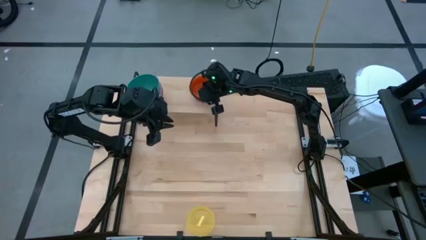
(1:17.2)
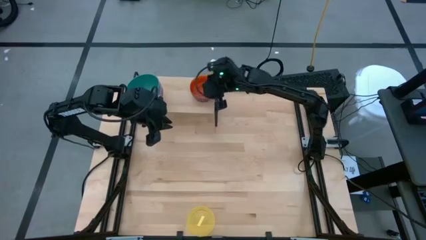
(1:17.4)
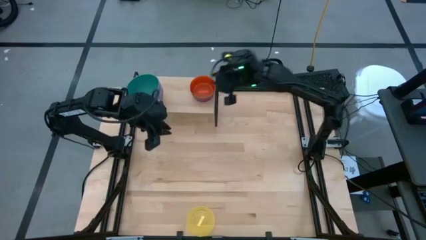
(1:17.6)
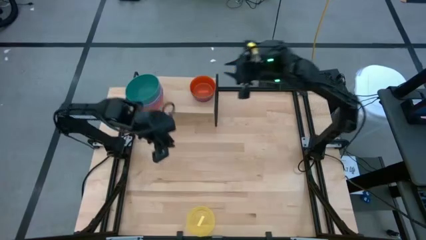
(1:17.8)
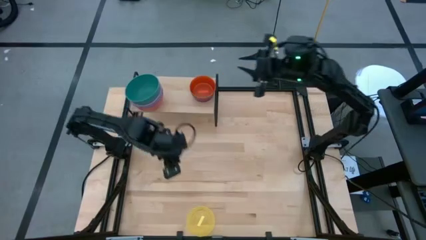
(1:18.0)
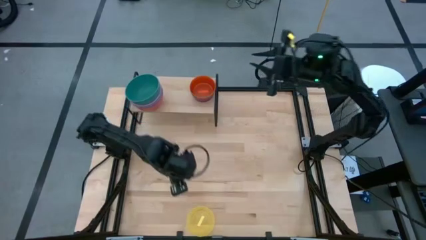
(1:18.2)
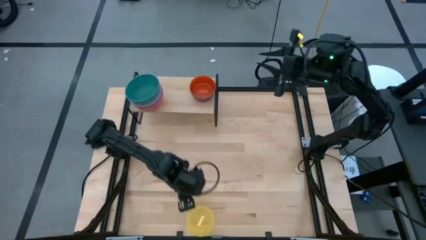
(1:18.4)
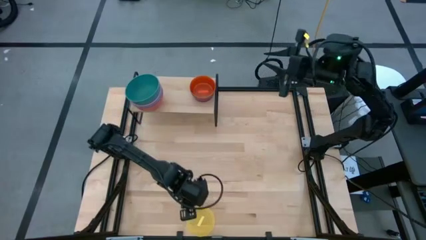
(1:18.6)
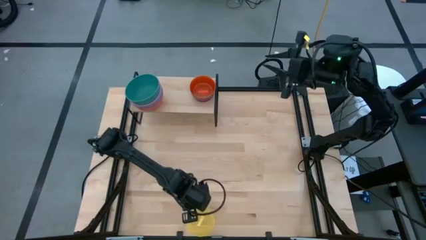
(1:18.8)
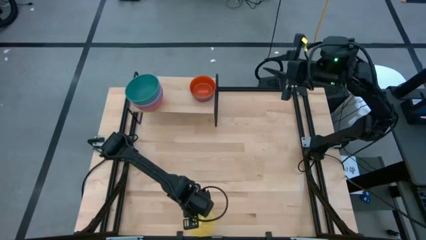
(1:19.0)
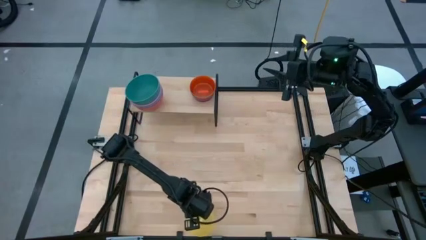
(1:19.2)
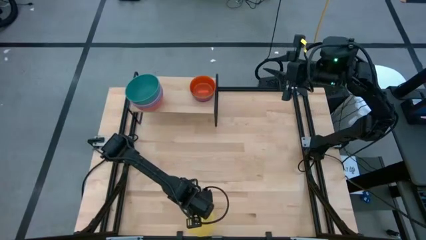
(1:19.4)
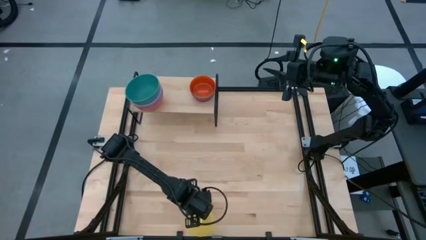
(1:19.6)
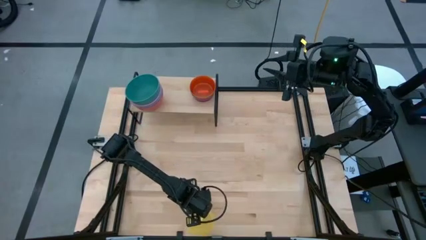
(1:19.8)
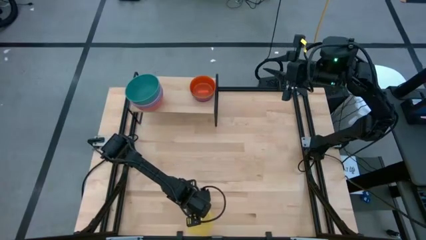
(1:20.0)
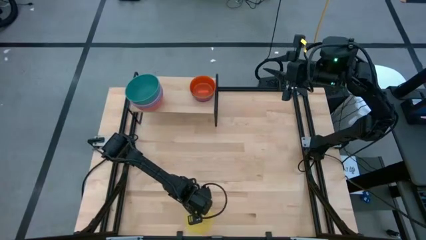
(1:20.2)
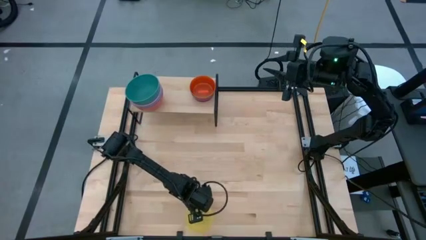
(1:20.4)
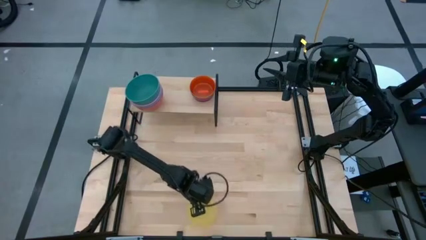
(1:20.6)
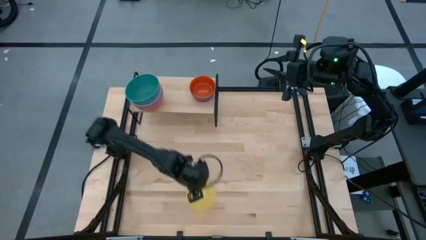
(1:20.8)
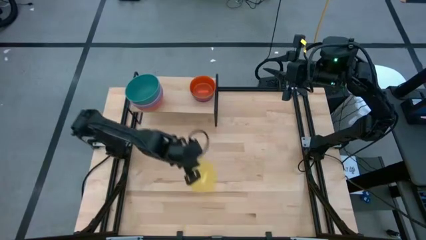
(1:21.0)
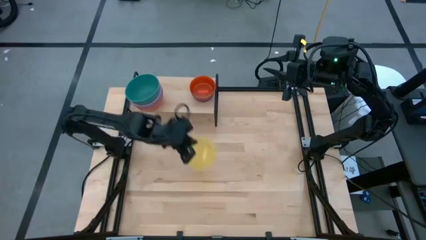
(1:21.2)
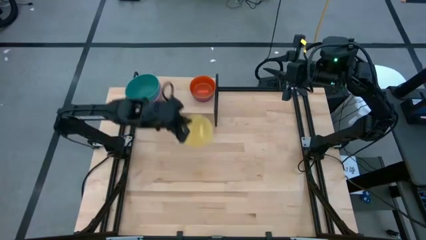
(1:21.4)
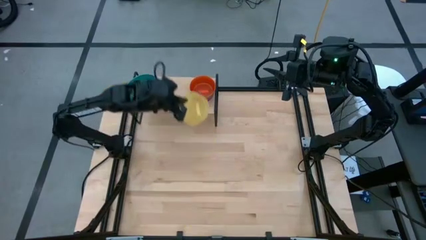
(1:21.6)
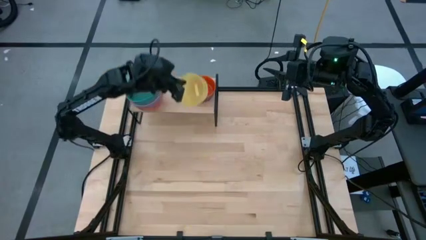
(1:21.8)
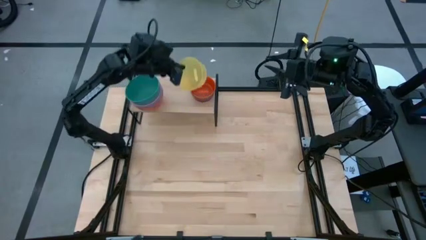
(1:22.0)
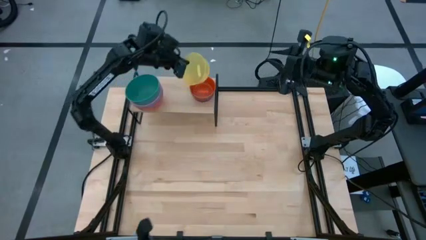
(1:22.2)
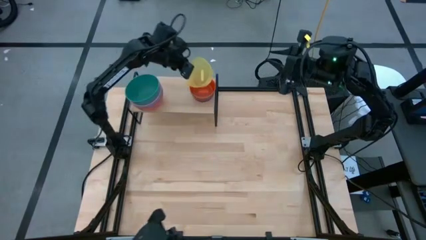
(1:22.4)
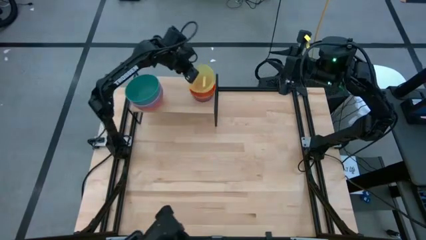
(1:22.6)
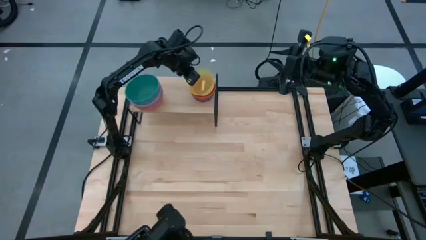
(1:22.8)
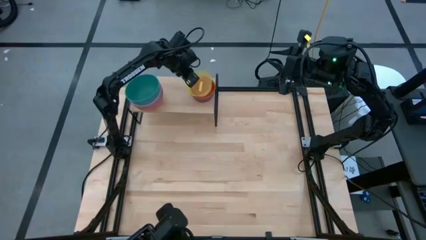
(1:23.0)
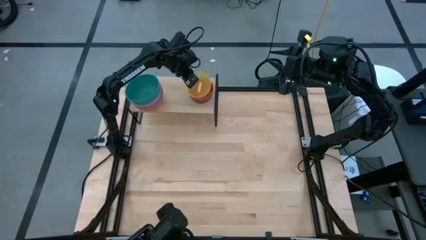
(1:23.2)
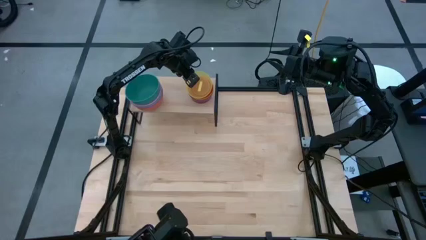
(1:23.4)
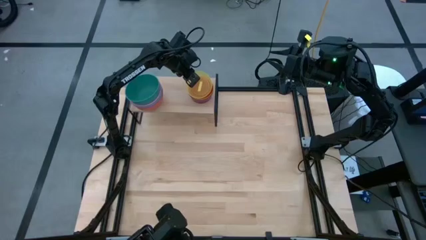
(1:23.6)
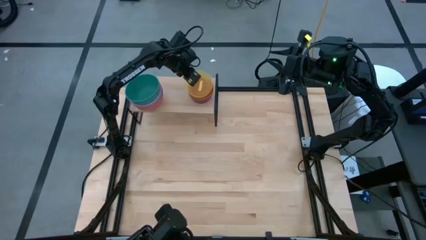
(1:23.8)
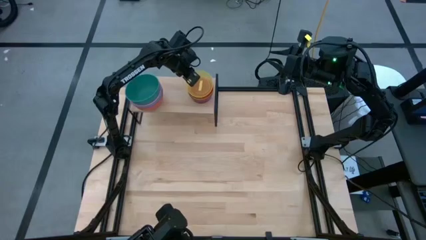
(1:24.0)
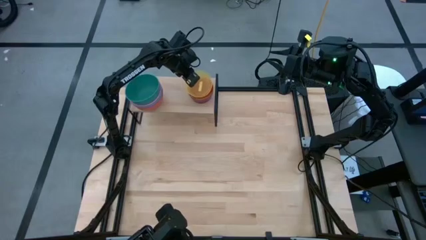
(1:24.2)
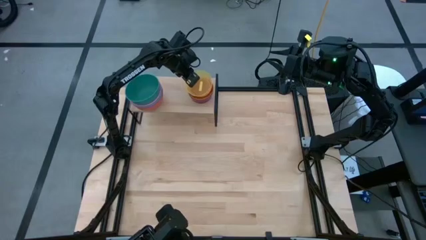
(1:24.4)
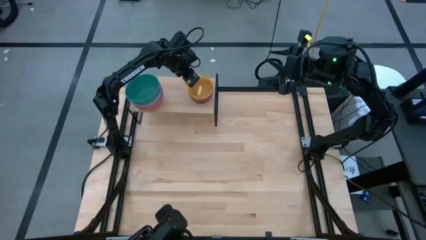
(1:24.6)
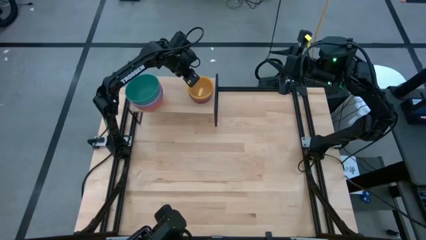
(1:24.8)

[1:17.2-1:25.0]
Task: Place and stack bowls onto a shelf
Stack the yellow bowl on top of the orange bowl on the shelf

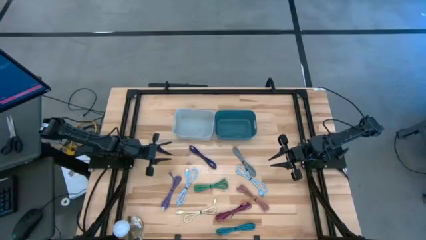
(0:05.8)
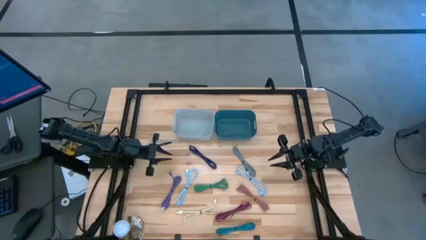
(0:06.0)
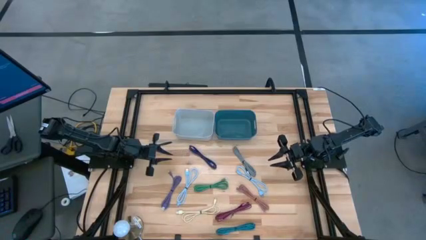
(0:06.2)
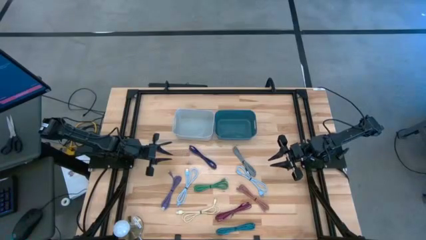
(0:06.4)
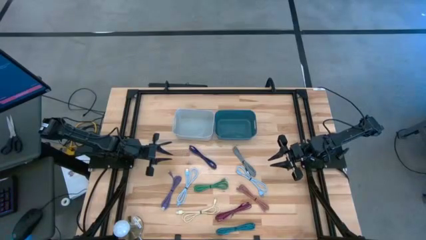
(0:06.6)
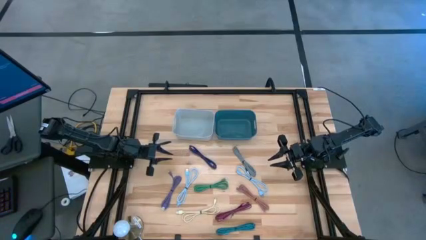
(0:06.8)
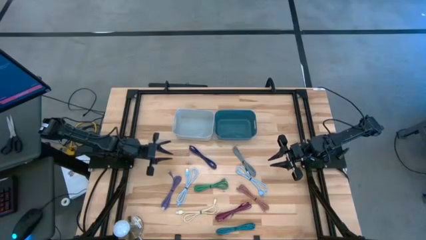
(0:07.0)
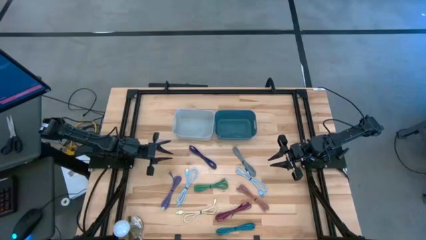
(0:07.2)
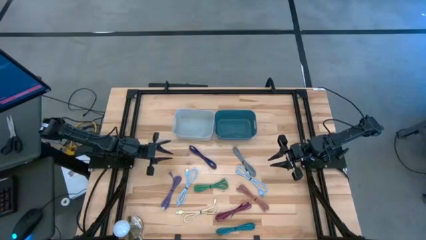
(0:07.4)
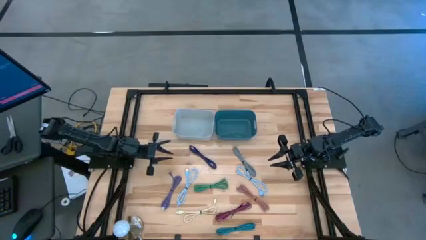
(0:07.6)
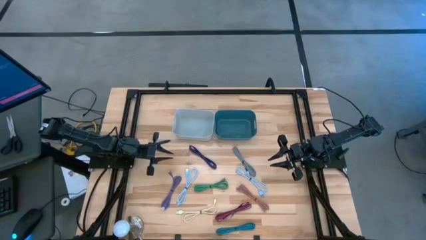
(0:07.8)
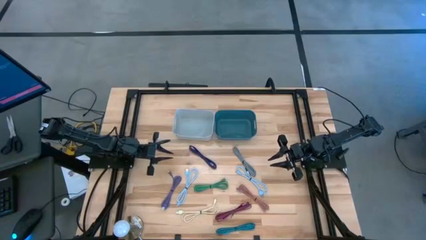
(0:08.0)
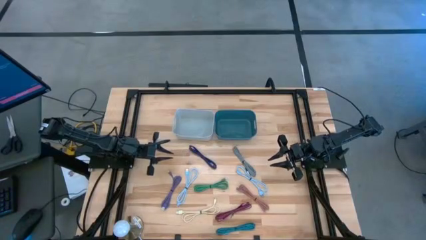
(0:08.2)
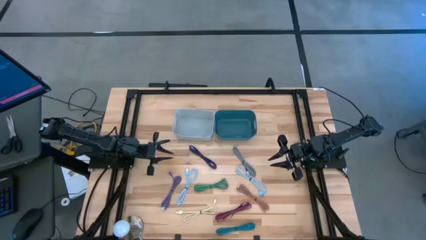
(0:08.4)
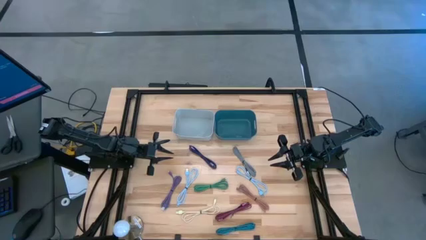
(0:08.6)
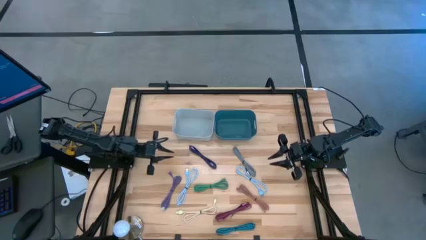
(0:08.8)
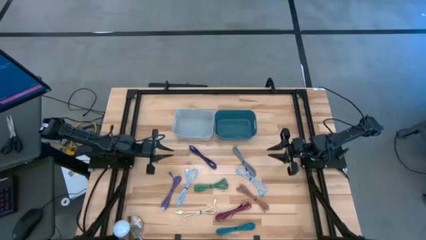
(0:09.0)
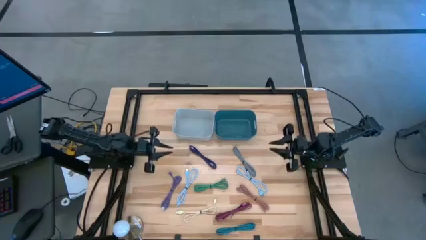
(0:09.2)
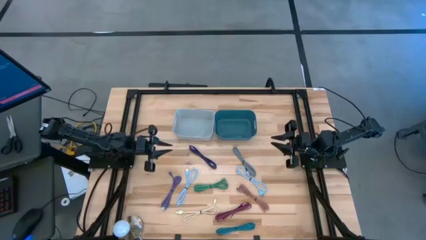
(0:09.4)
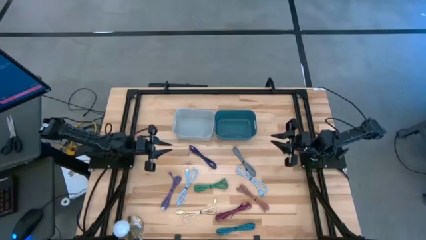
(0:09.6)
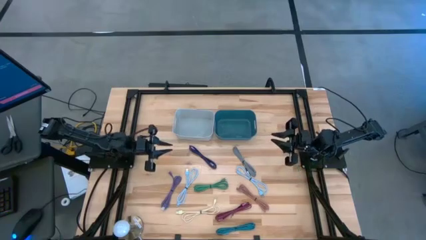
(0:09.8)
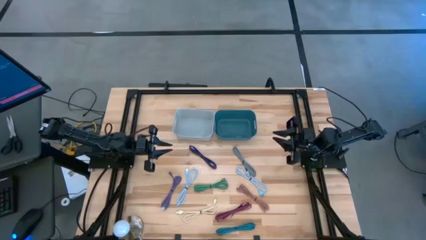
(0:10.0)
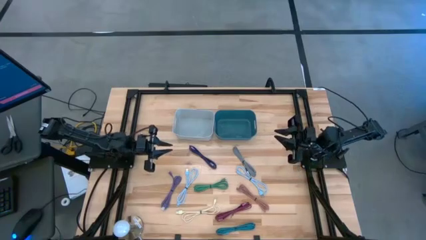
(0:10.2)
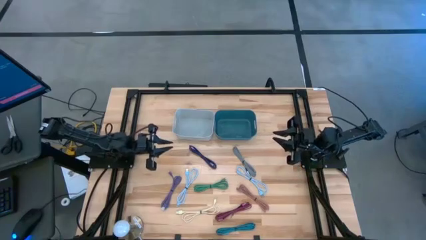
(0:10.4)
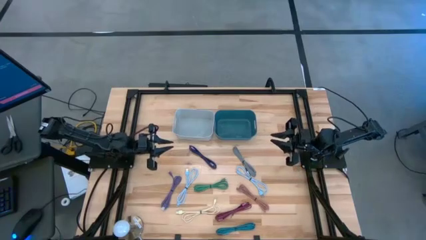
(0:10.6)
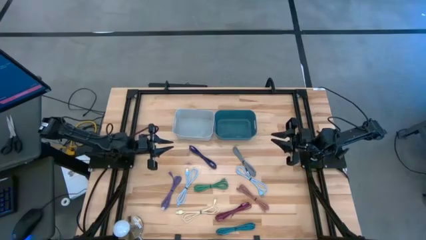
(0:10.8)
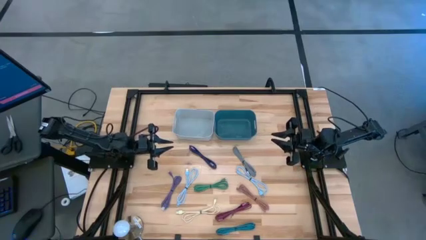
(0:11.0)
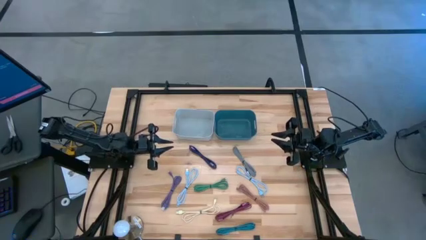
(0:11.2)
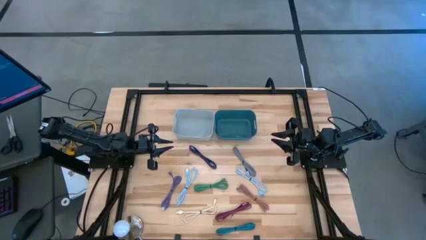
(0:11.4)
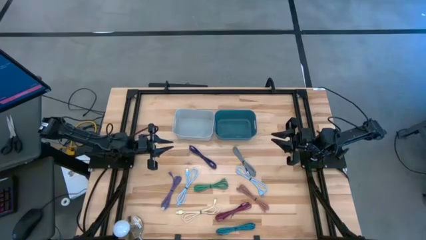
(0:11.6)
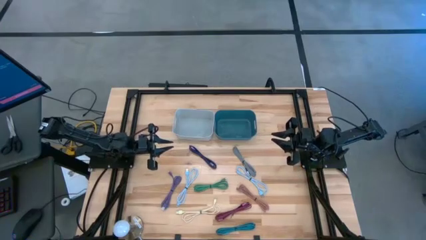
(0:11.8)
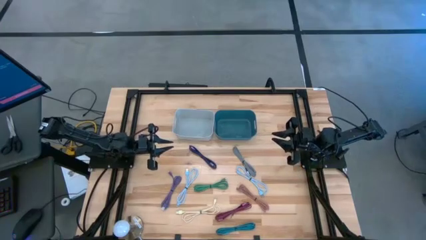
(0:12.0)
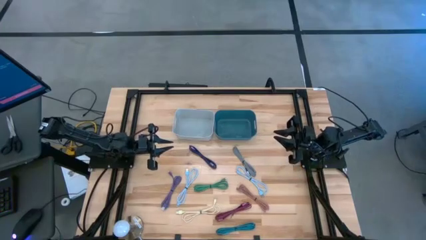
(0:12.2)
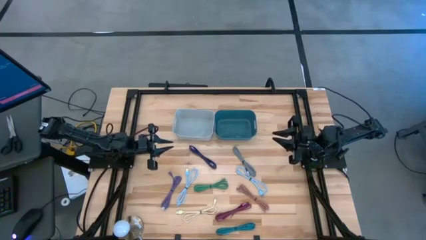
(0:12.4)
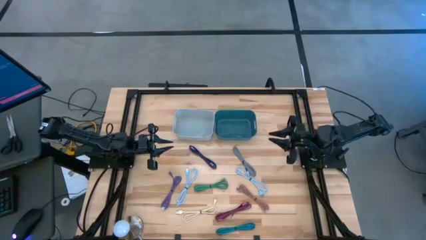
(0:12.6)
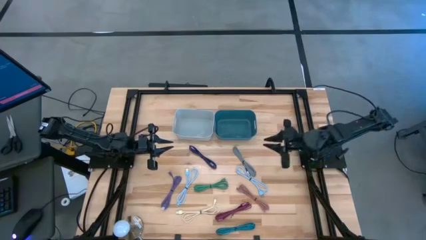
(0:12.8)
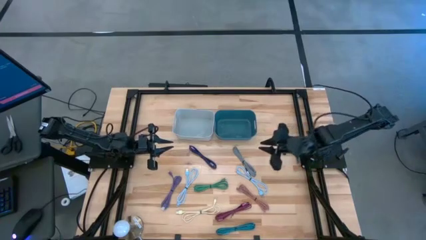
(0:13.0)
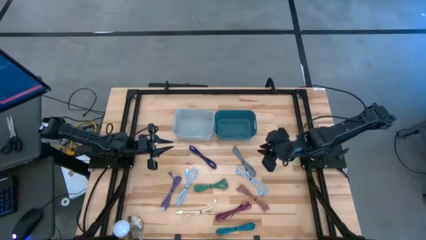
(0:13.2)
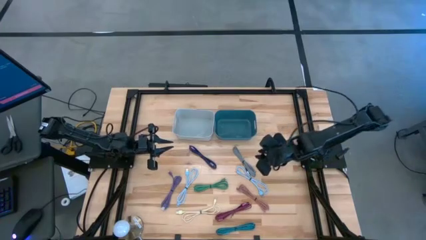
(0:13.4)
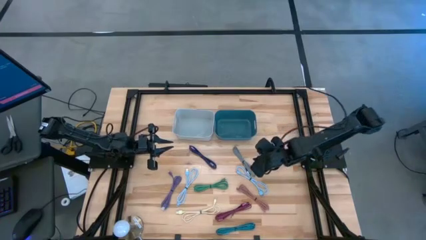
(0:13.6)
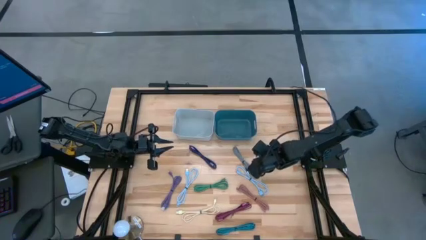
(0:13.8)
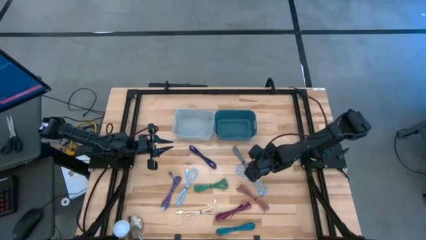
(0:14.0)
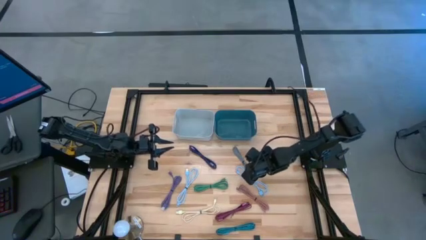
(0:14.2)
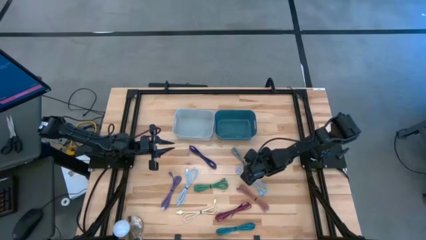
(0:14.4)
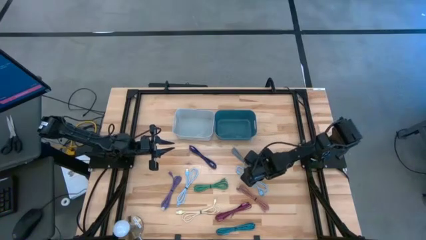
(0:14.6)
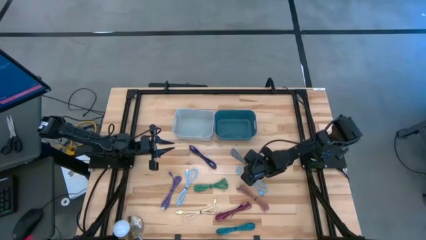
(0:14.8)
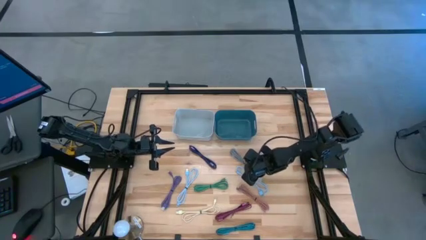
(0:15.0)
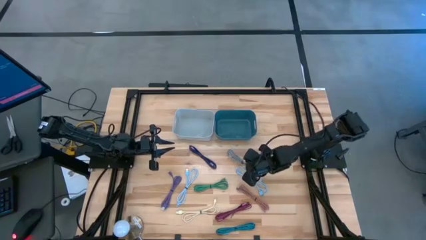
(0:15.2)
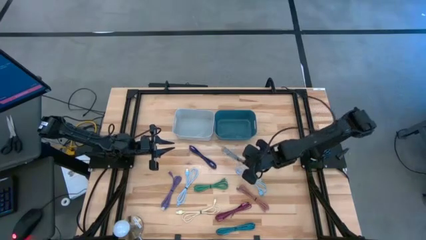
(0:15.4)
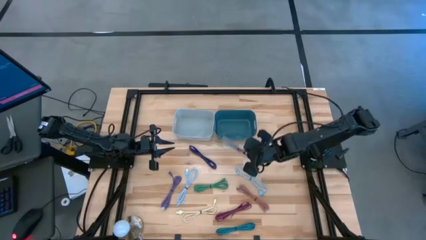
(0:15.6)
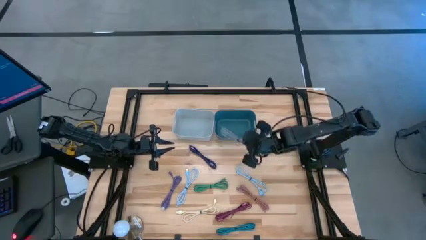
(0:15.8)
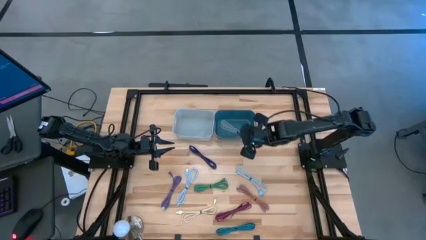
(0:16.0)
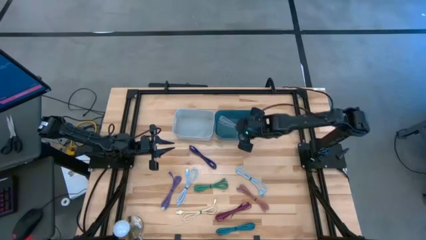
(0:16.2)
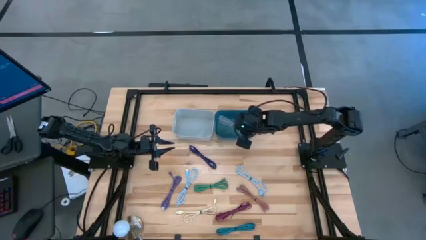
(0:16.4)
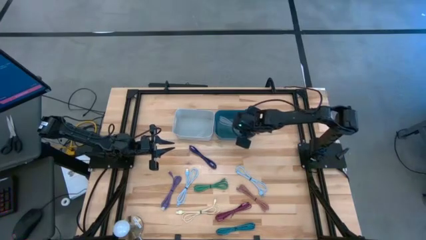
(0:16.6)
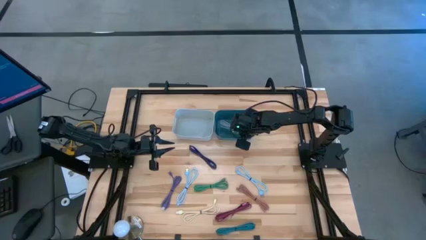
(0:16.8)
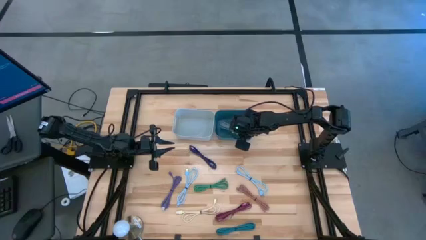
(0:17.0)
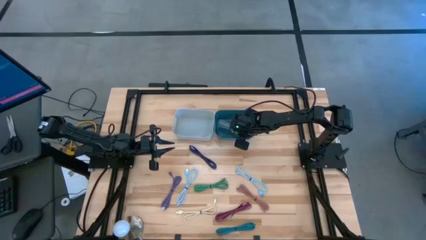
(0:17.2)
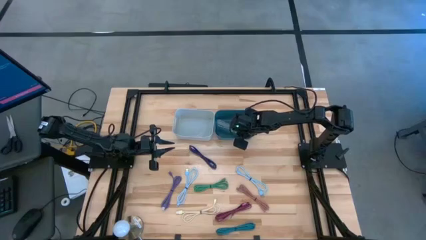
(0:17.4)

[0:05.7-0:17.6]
Task: Pick & Place USB Port
Put the white patterned charger cable into the green bin
